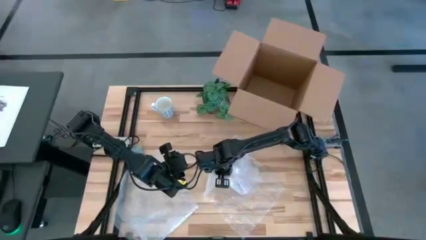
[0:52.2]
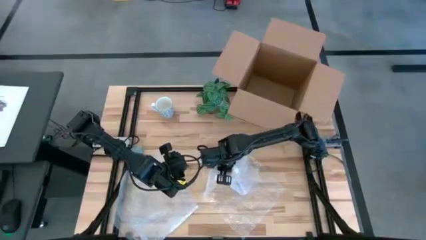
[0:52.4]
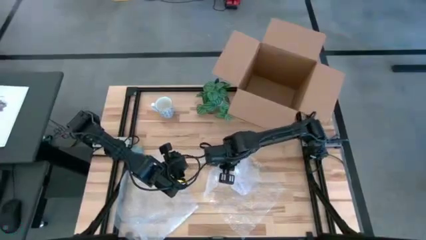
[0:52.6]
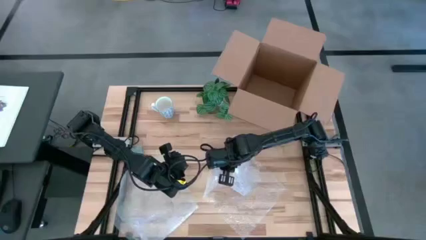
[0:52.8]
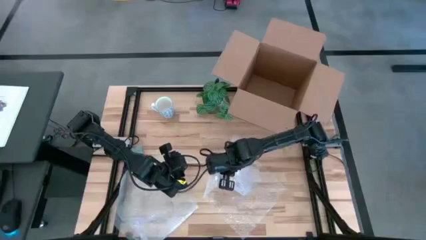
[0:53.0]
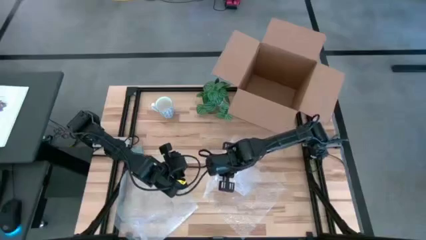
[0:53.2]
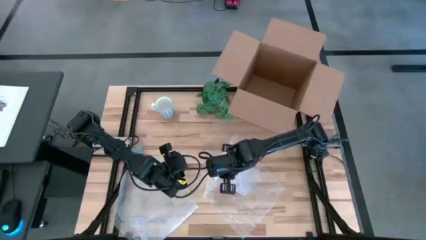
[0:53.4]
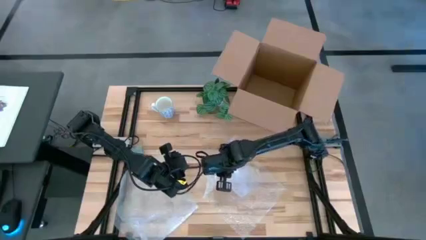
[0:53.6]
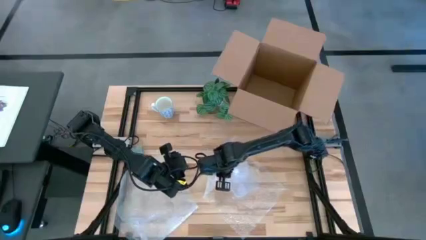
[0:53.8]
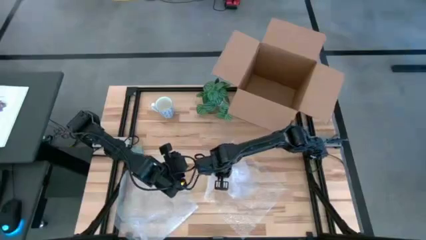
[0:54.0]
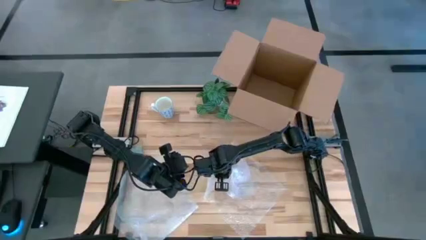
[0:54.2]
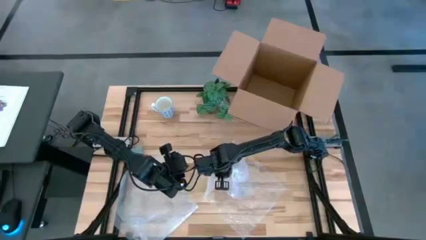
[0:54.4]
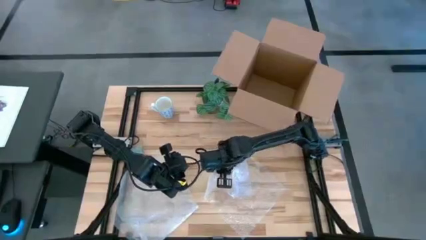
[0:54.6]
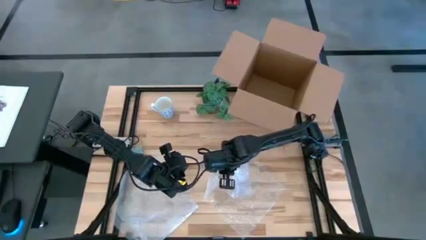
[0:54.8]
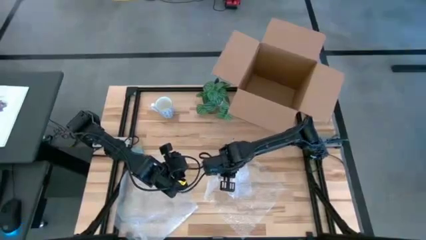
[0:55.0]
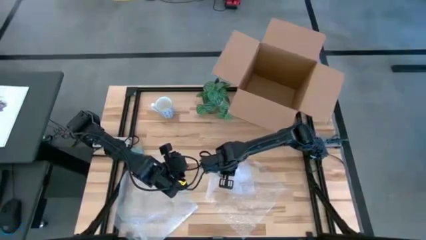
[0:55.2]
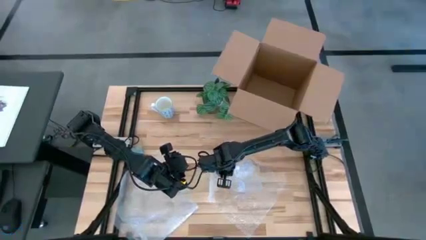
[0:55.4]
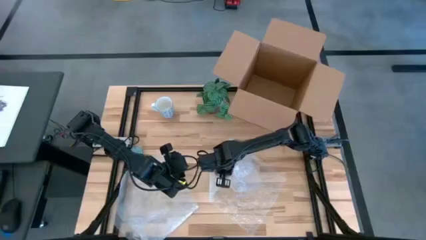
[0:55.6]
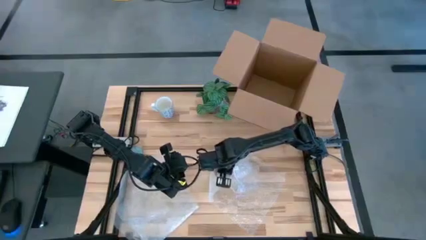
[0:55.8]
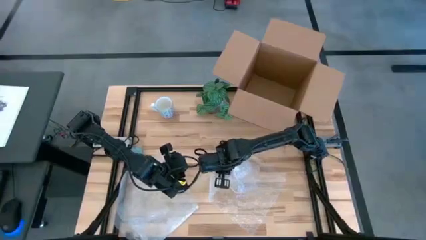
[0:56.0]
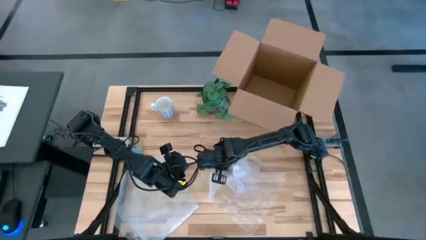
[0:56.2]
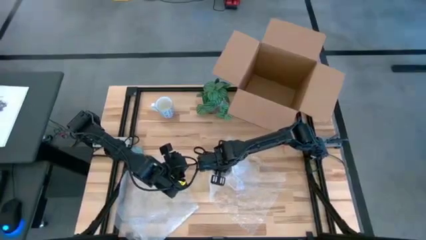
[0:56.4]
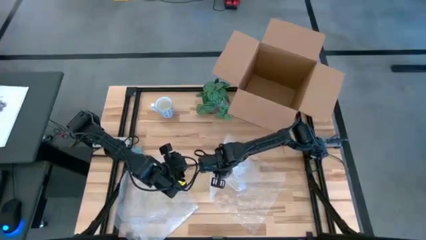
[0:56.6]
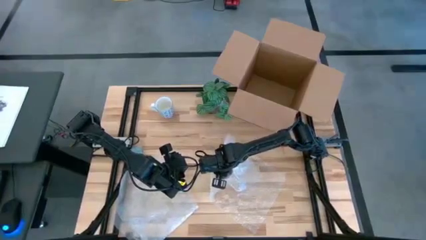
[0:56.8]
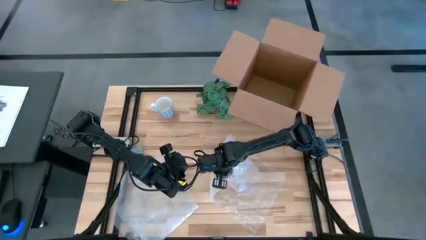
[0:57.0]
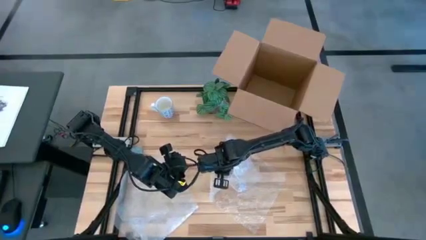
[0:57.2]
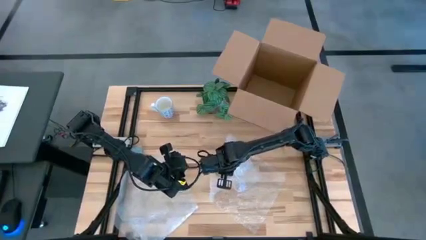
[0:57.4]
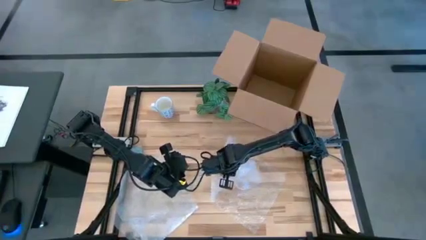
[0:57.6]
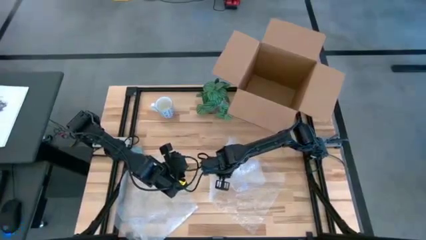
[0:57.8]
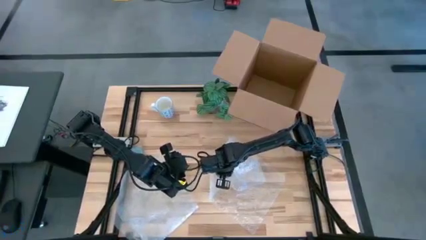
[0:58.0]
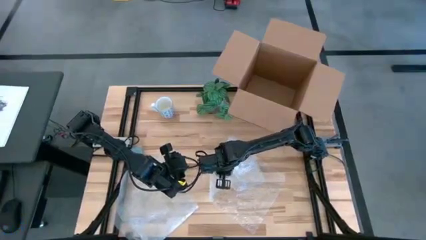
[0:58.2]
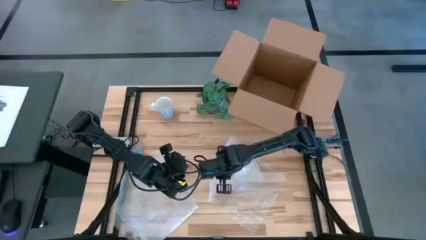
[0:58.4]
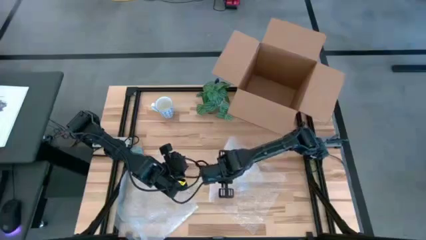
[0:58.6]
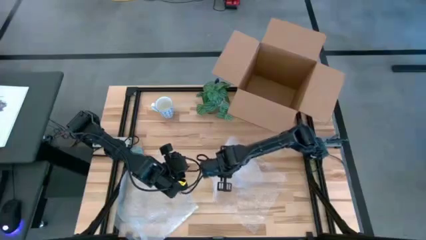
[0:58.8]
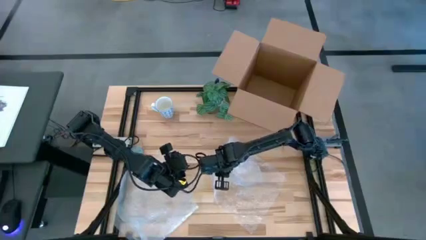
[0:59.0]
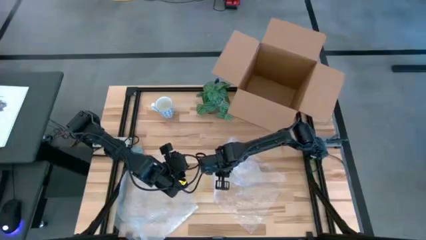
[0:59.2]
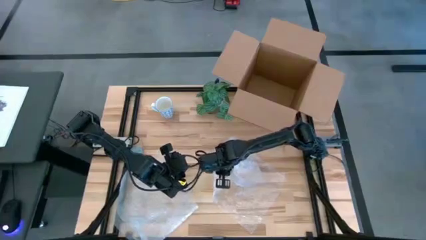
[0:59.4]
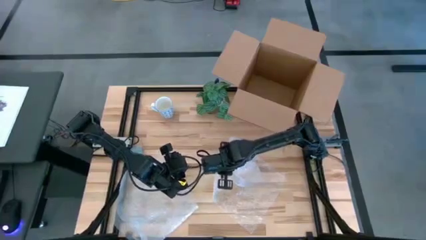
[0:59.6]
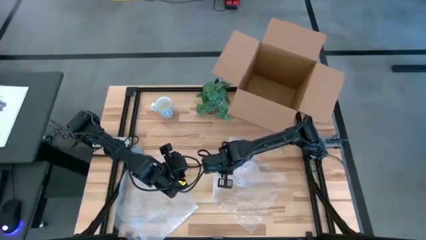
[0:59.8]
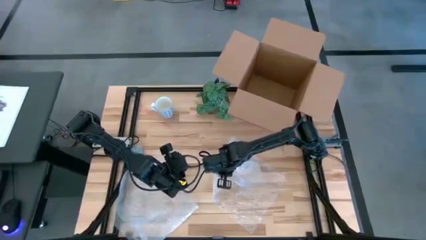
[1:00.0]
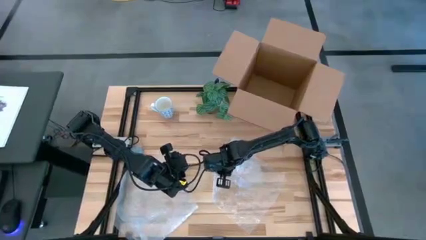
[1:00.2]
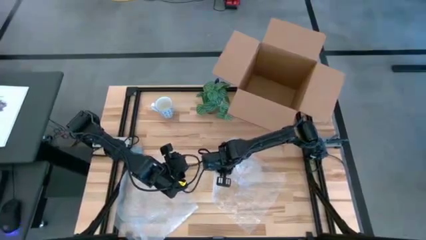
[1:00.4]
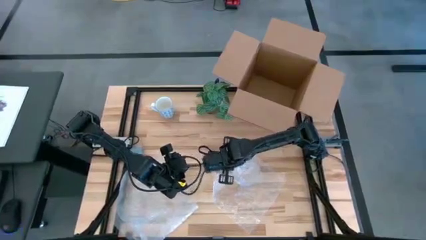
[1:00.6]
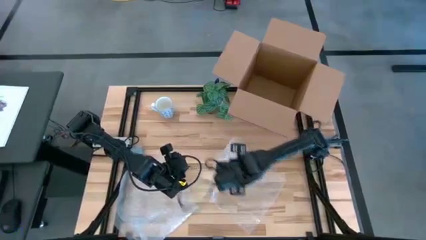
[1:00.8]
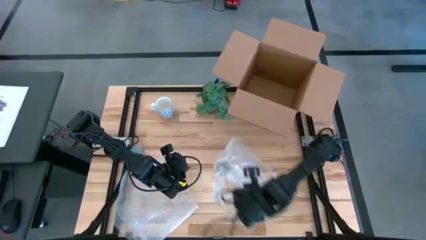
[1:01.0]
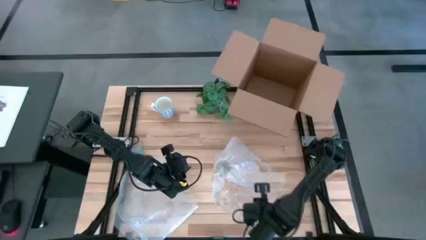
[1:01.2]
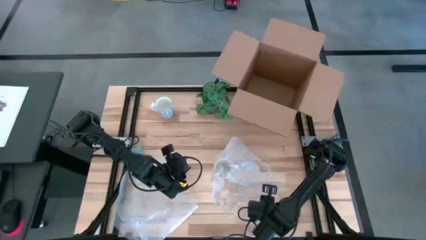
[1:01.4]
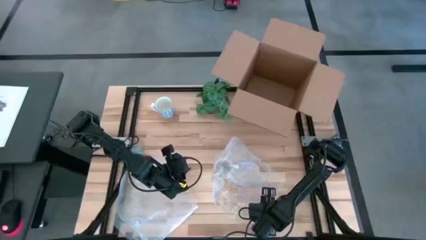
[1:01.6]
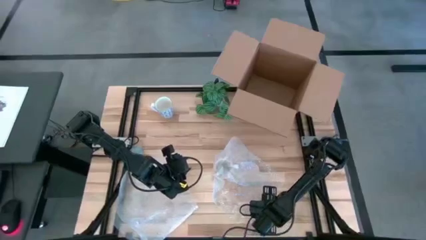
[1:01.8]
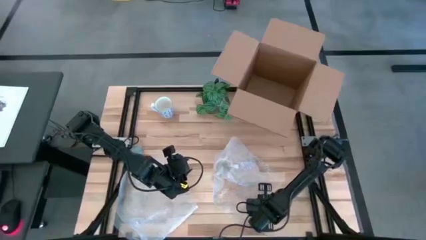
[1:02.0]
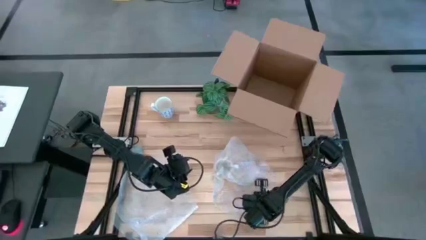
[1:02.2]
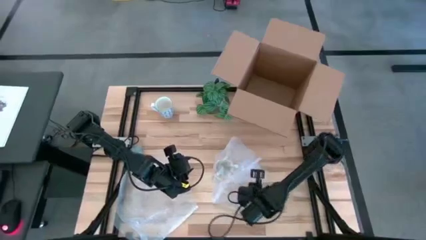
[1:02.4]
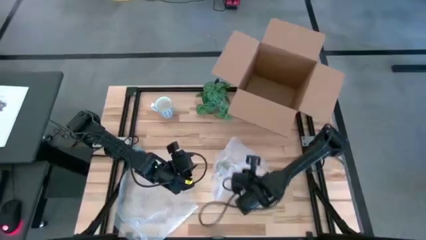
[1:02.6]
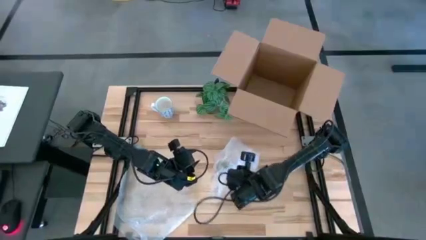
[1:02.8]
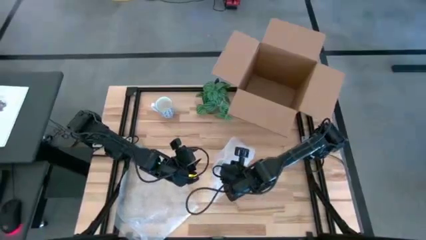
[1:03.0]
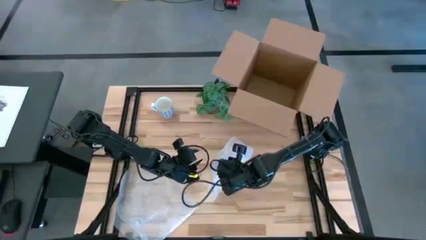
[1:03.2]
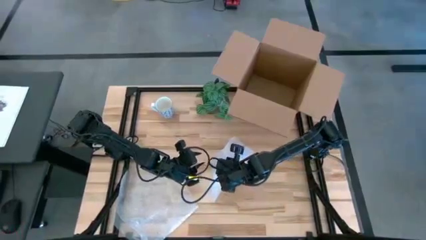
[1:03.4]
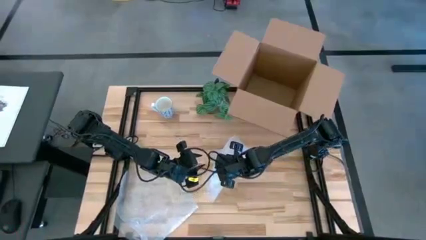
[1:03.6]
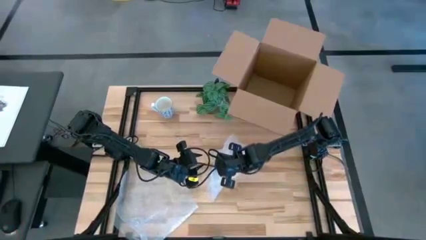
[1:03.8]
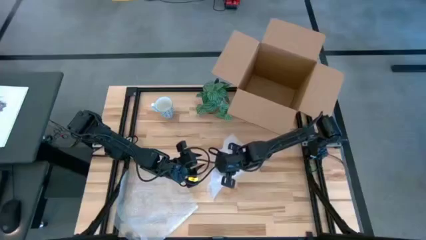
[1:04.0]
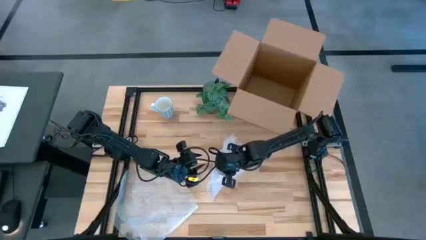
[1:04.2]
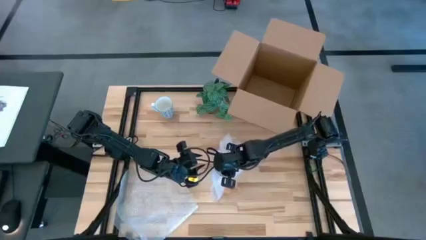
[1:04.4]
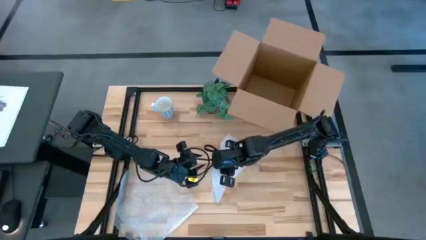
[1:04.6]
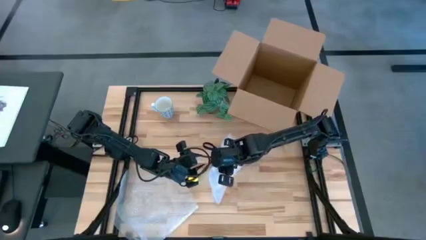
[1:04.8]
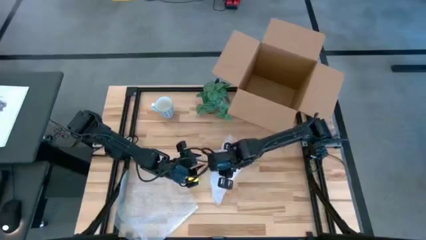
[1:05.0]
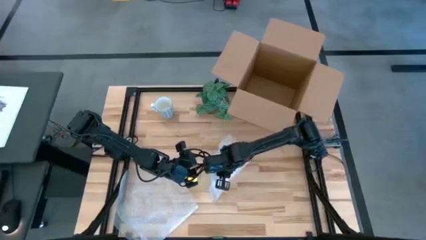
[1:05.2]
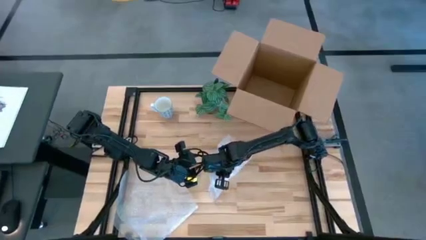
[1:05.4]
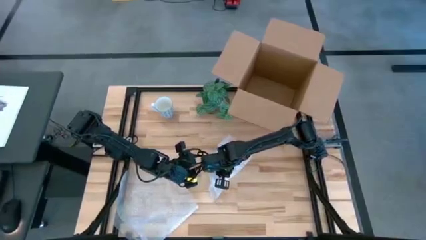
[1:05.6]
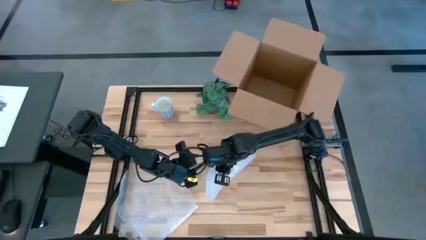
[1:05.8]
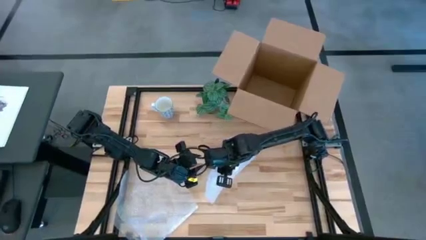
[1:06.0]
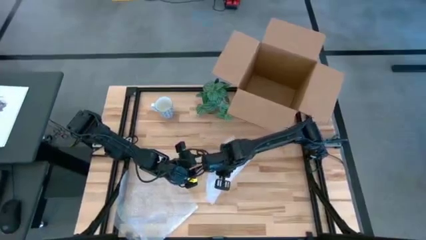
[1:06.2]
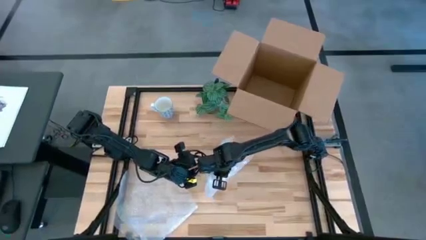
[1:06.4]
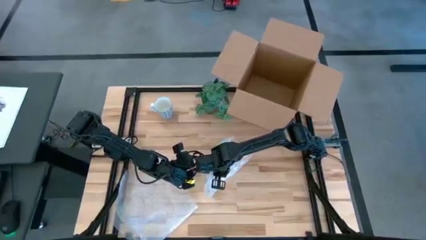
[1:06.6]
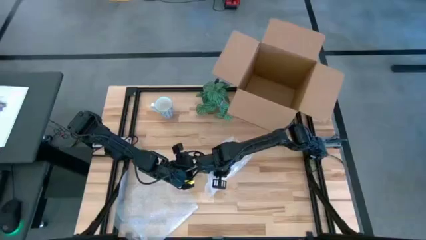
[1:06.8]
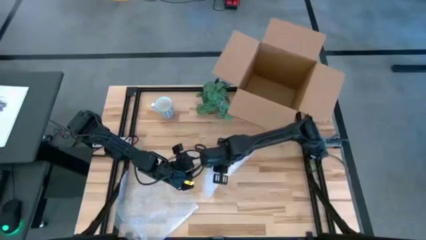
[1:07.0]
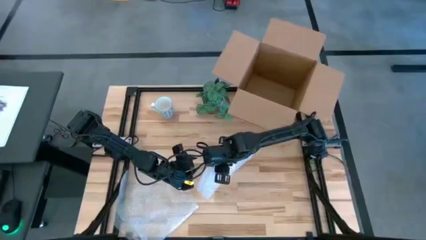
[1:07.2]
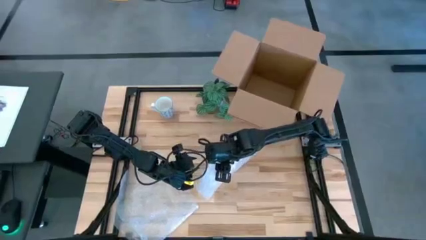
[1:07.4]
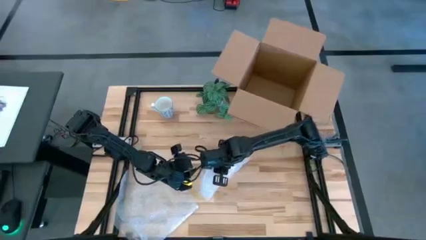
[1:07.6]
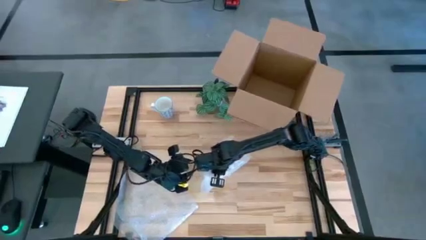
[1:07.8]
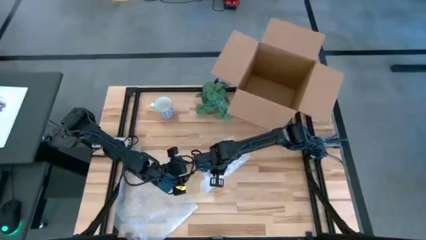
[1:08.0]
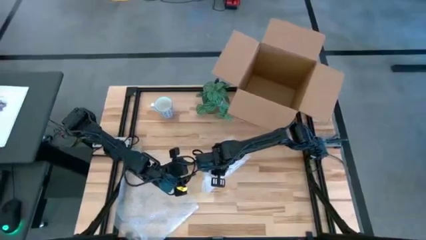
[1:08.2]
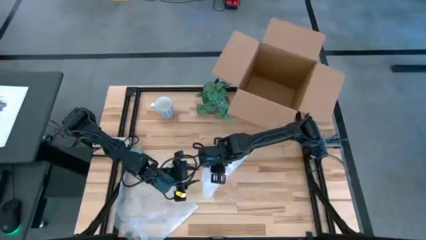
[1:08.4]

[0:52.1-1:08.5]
Task: wrap mug
Wrap the yellow mug
